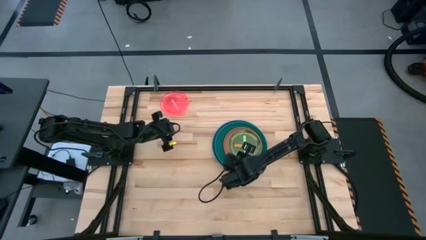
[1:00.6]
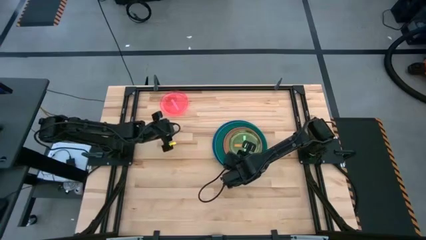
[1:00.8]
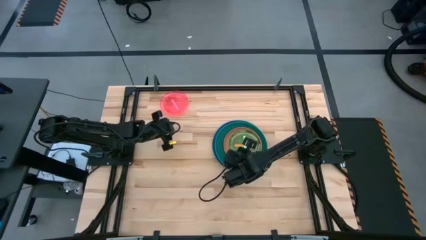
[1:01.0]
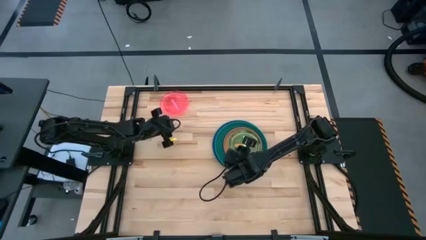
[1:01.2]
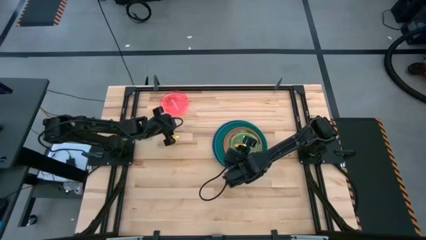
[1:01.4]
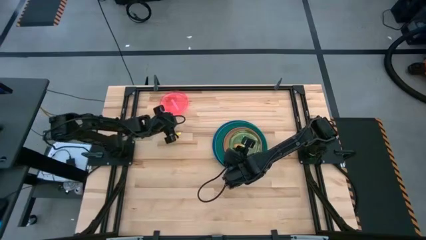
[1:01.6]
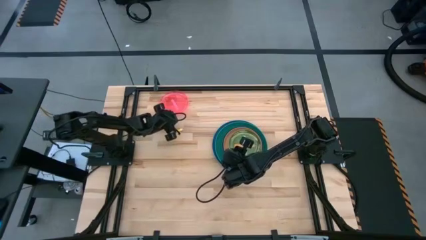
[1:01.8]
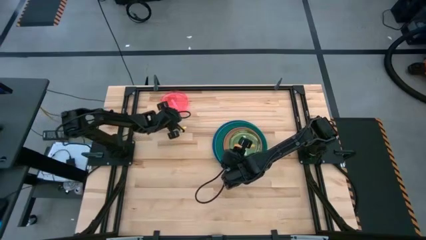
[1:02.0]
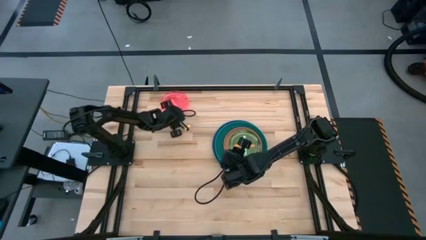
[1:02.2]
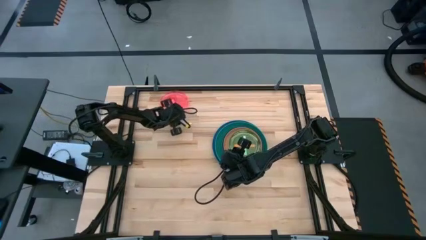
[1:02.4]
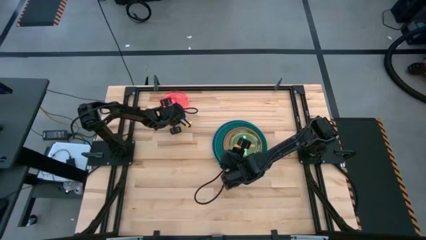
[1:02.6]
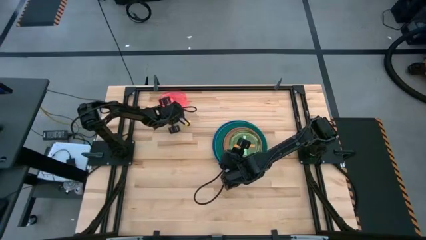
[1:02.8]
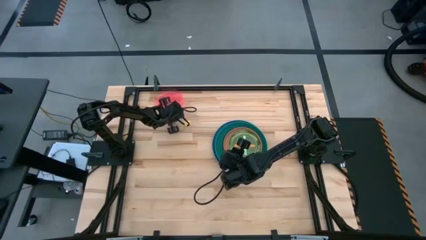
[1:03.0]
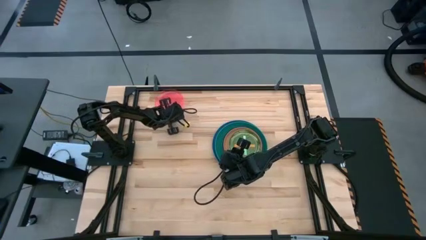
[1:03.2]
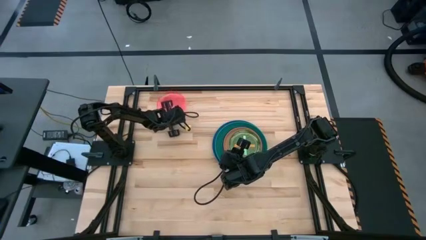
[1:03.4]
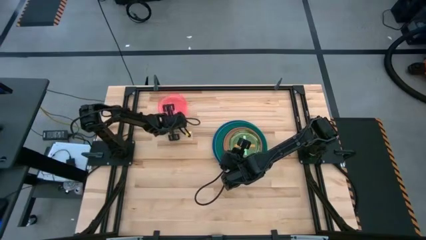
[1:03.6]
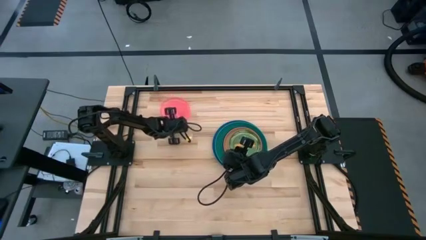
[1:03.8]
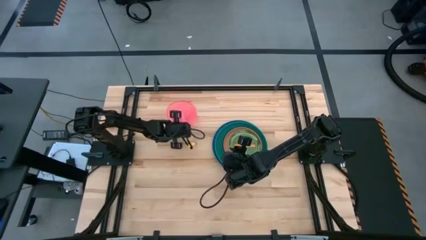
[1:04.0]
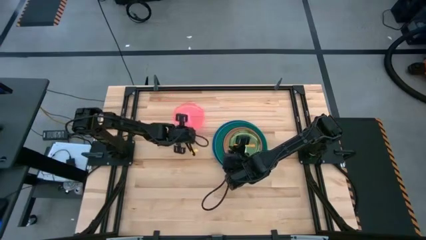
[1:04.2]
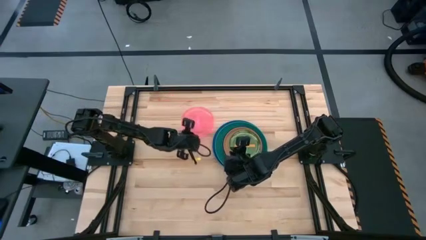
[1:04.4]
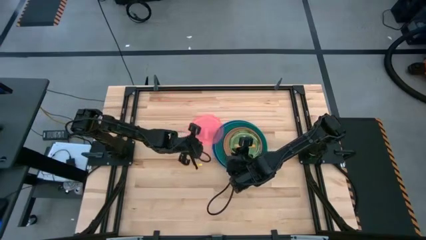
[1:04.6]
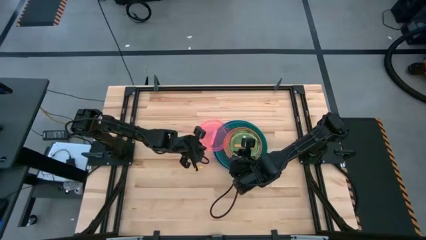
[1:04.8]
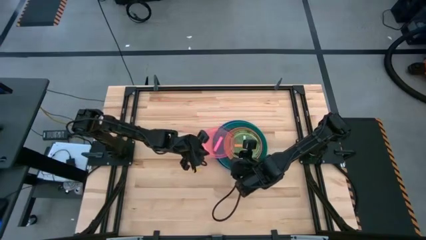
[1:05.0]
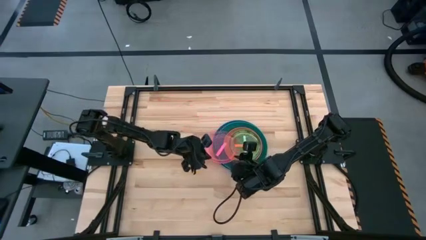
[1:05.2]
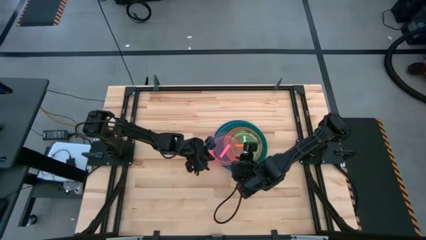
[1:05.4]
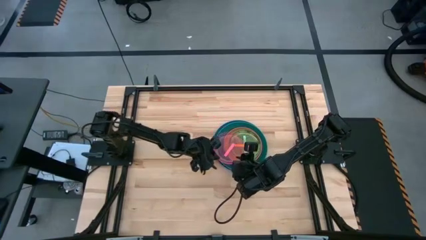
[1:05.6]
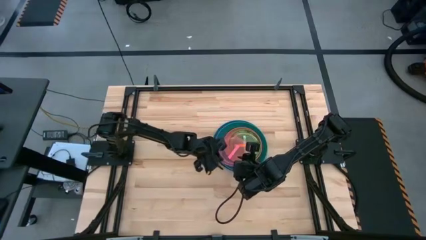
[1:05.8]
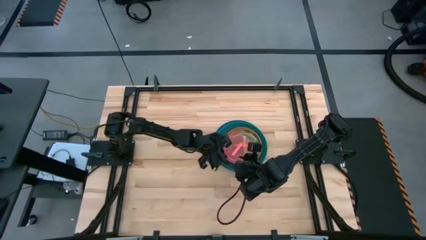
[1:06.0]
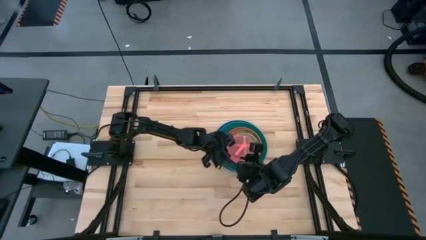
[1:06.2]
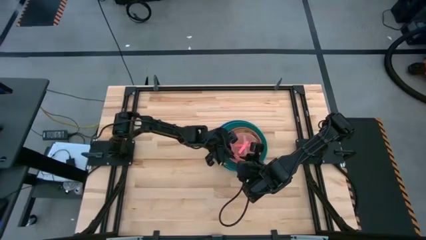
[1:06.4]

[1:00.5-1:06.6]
Task: Stack plastic plates
Stack the pink plate on top of the green plate

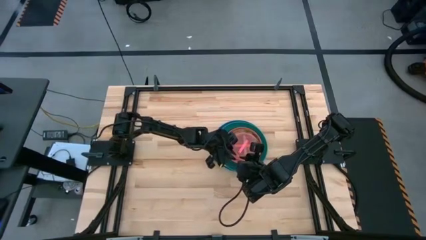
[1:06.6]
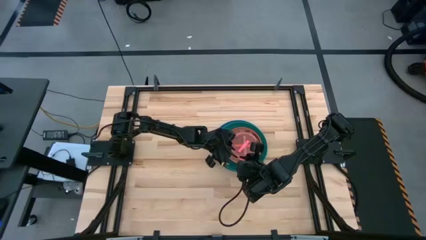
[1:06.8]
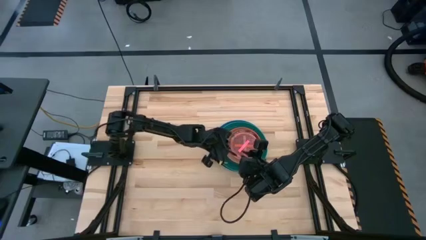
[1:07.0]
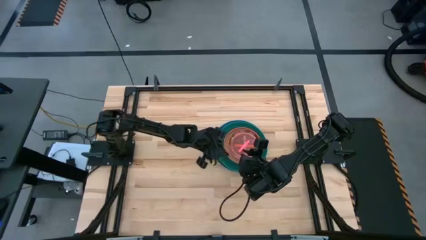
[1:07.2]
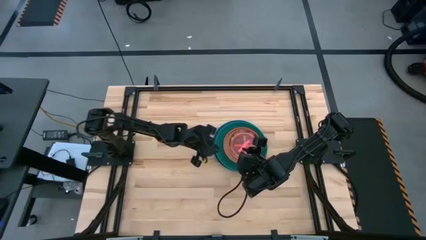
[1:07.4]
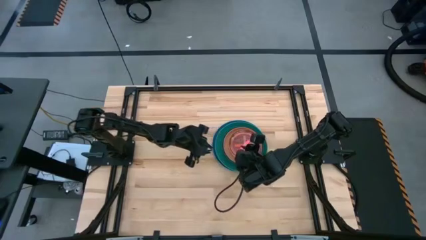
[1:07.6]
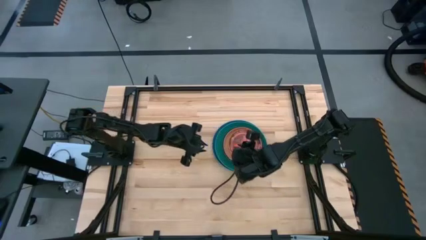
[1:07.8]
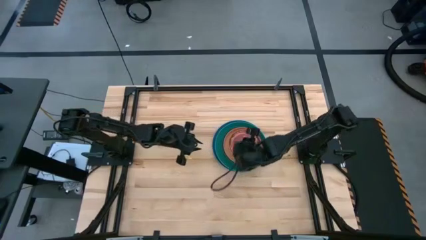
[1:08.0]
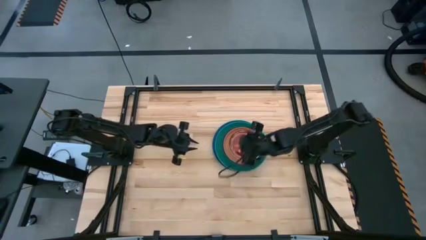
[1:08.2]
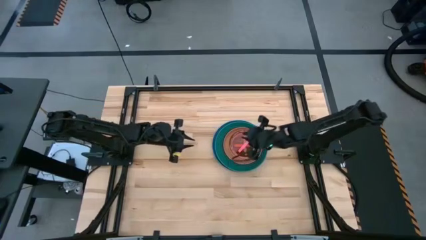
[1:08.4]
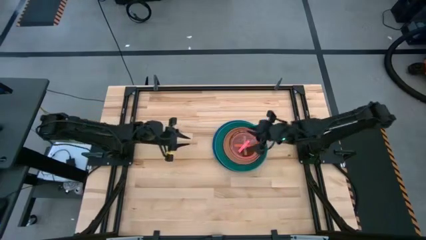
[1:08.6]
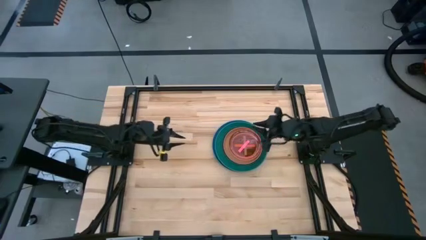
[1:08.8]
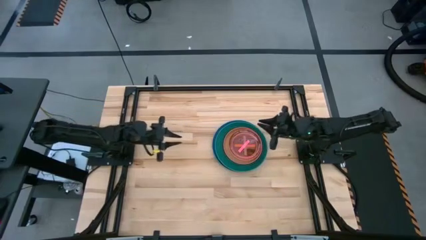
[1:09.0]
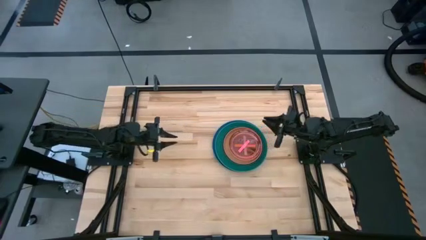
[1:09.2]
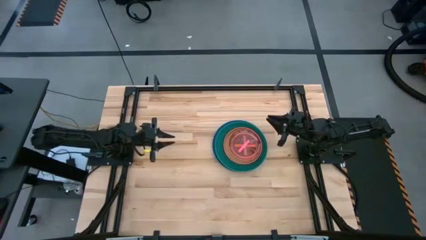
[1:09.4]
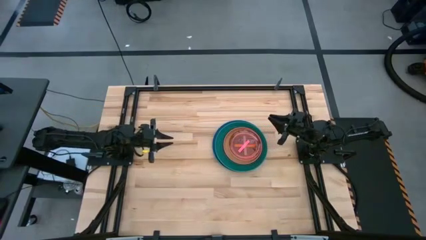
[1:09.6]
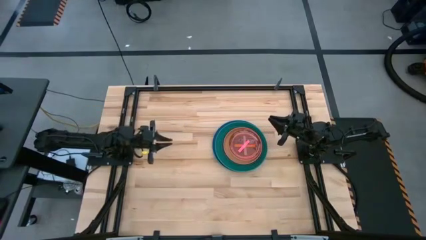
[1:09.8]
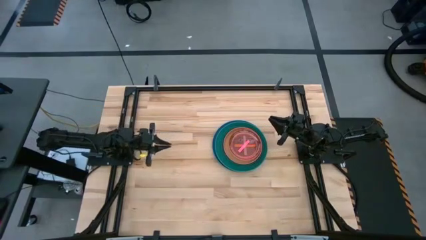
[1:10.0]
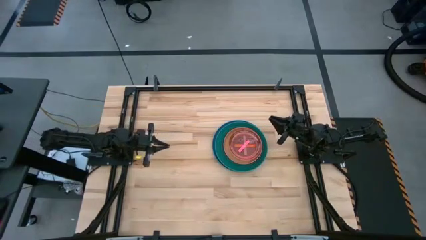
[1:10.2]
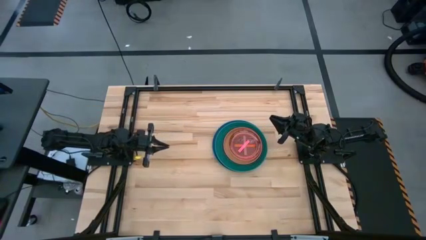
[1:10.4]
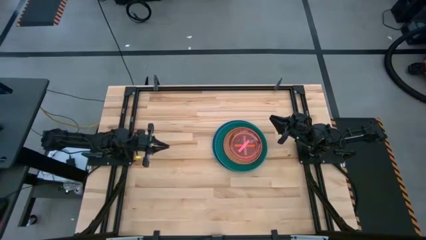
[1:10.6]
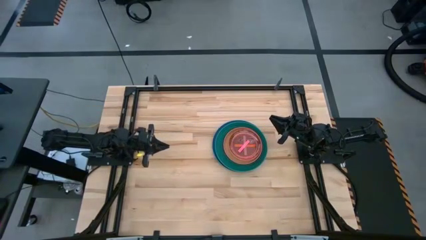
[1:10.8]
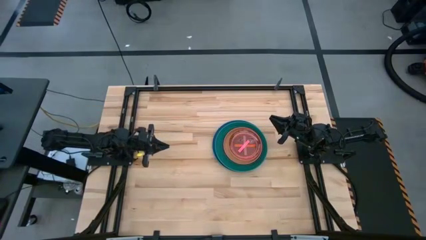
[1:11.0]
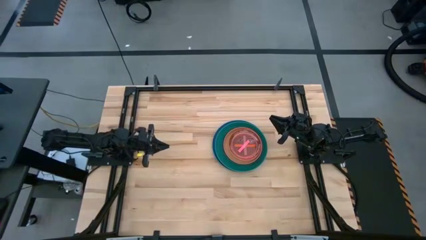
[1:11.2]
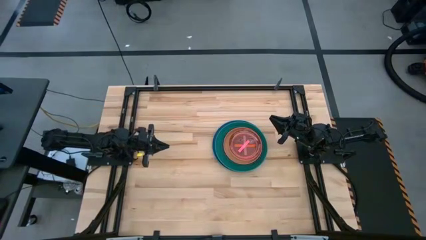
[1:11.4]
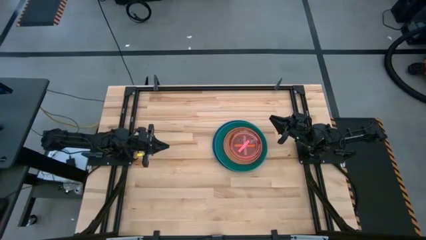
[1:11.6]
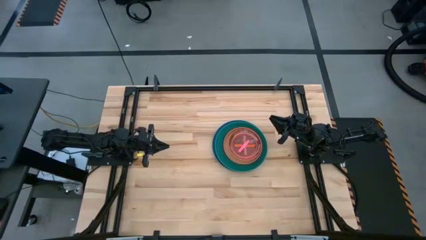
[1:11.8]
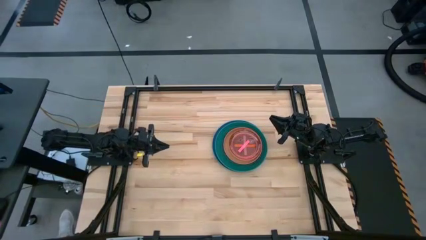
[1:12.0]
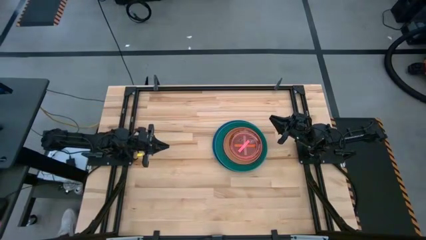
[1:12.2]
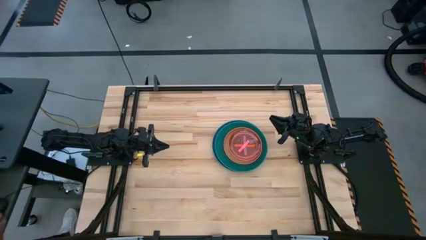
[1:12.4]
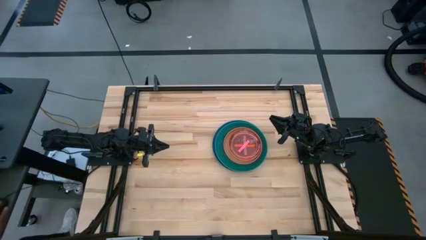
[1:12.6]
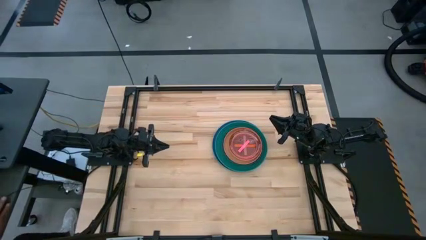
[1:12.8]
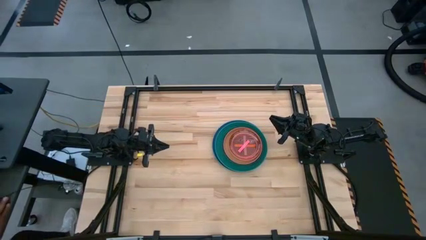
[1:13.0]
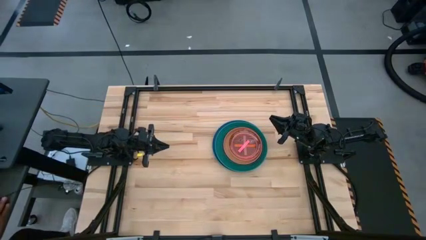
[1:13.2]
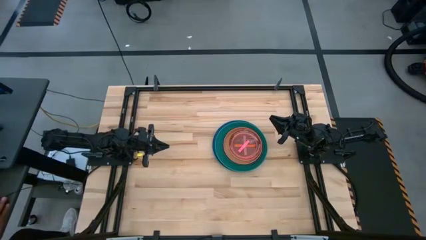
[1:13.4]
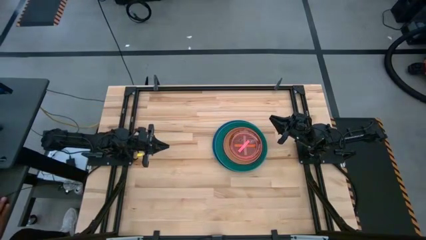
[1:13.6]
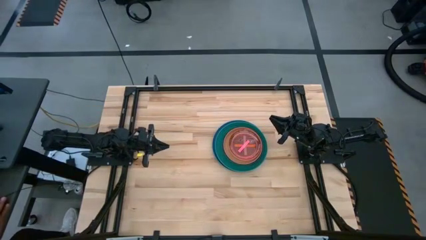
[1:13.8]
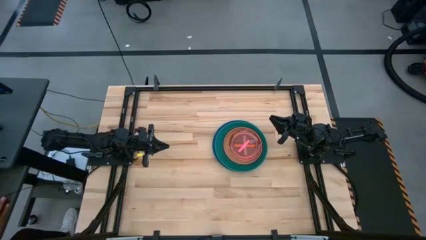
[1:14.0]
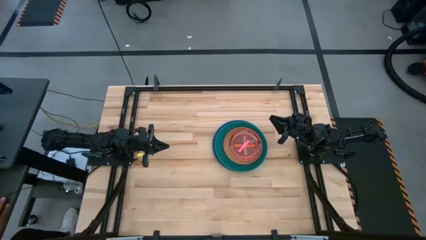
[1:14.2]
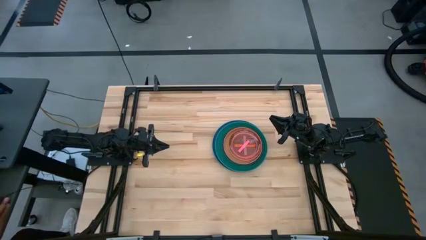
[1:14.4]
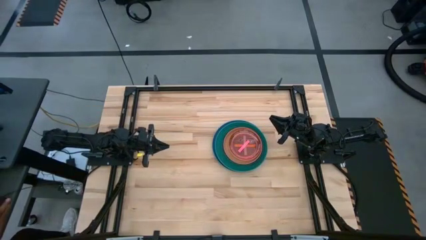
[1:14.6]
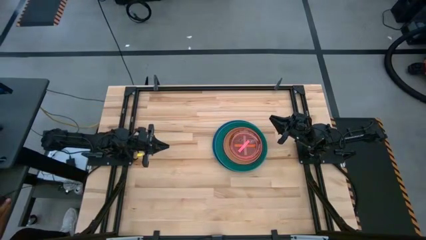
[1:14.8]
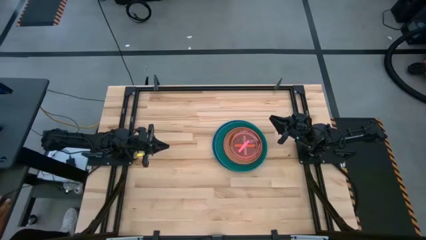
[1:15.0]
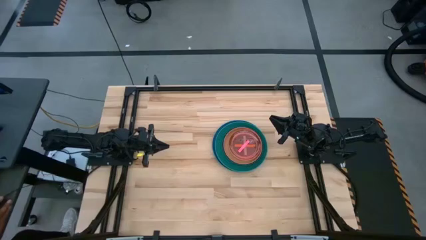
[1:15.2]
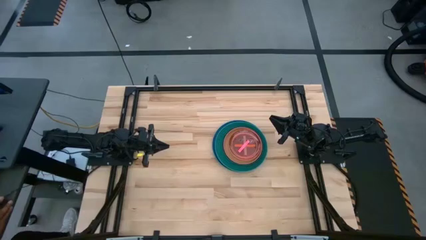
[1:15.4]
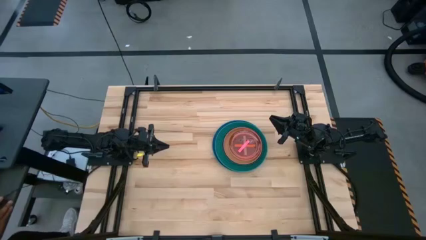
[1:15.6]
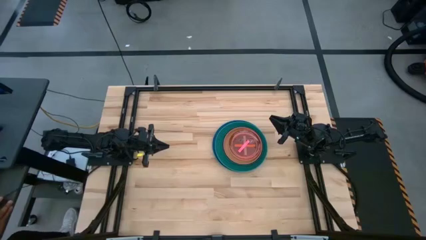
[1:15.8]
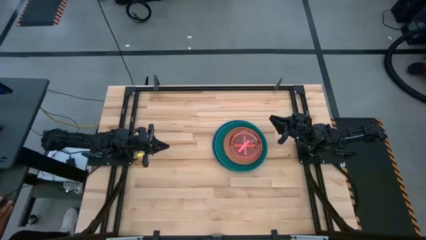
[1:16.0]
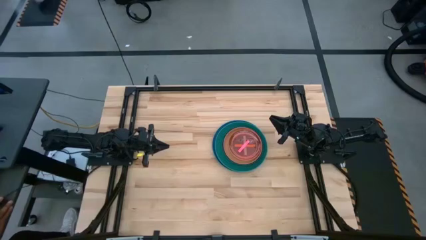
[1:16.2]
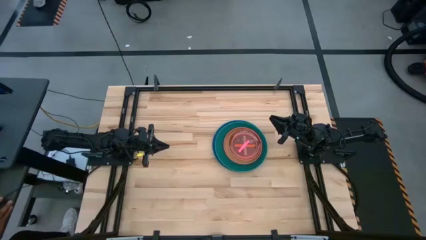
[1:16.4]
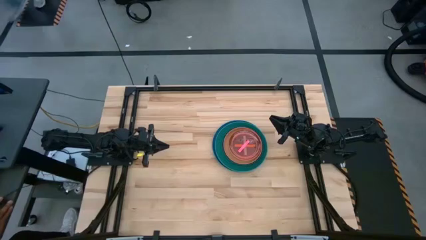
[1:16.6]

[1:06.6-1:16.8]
Return to Home Position
